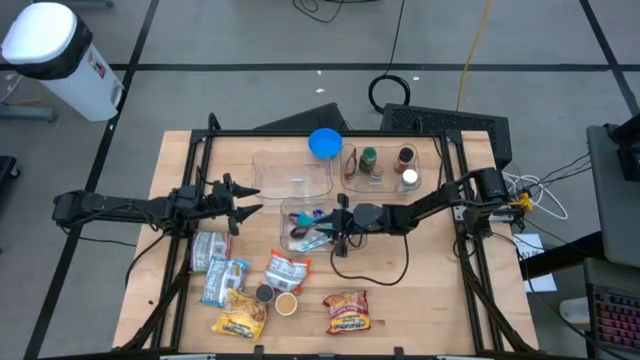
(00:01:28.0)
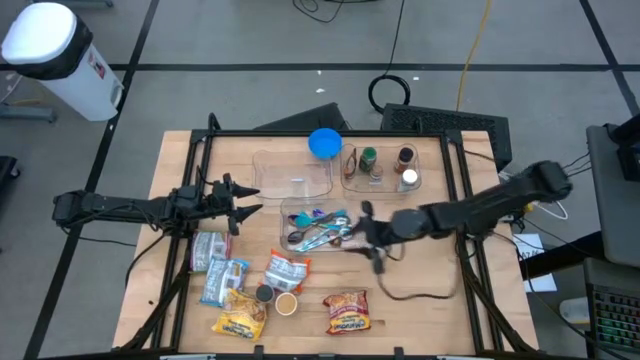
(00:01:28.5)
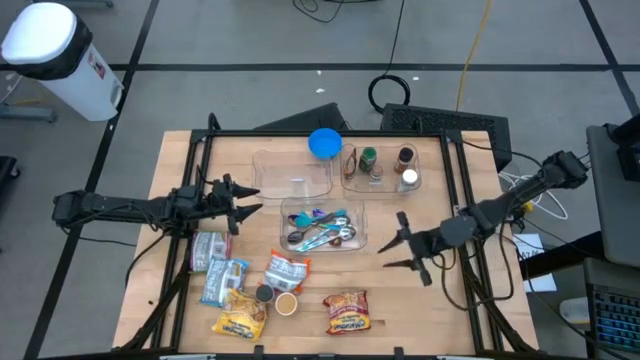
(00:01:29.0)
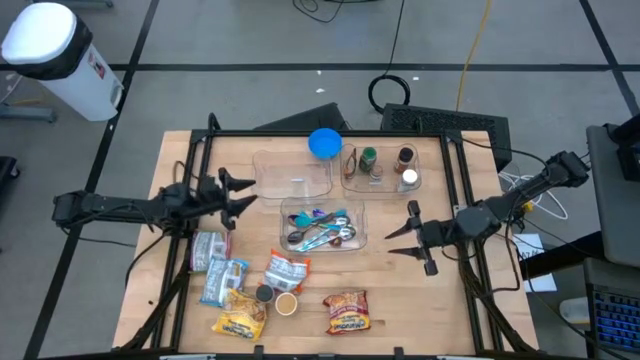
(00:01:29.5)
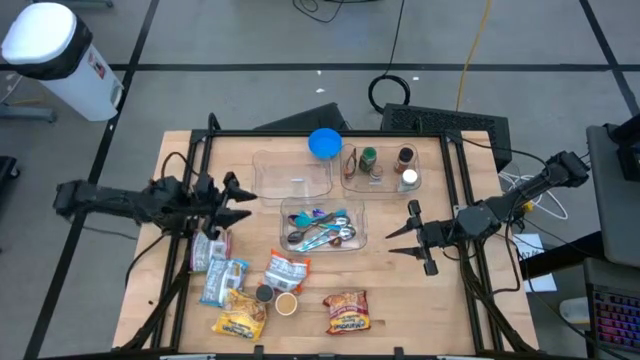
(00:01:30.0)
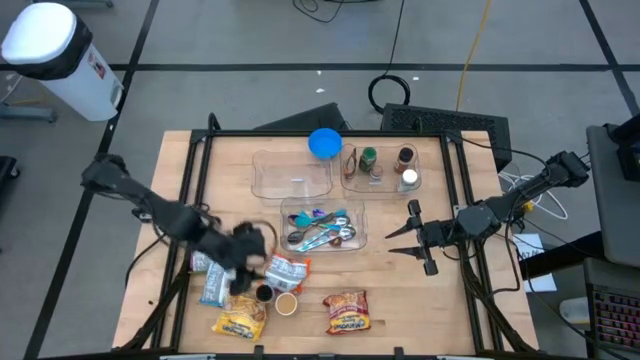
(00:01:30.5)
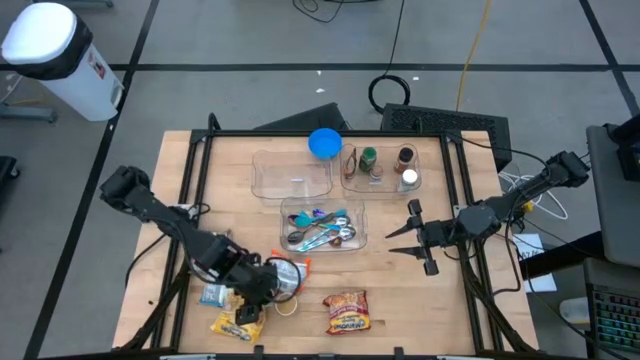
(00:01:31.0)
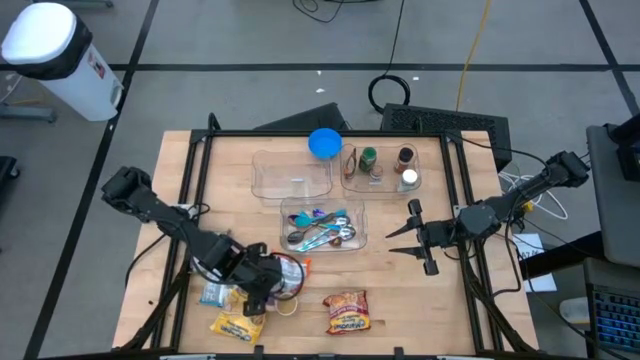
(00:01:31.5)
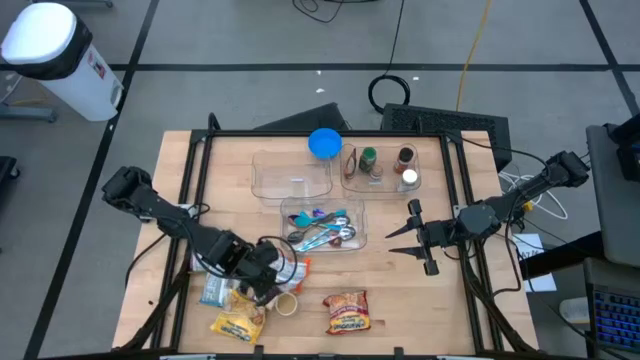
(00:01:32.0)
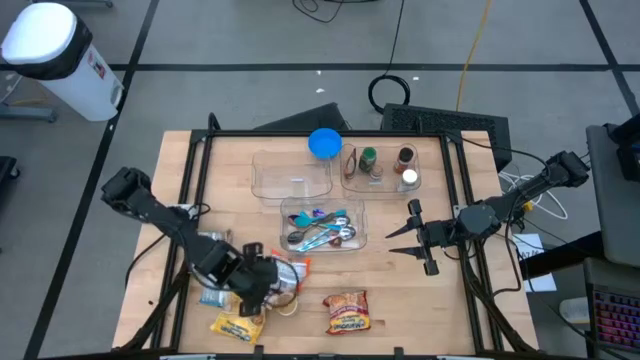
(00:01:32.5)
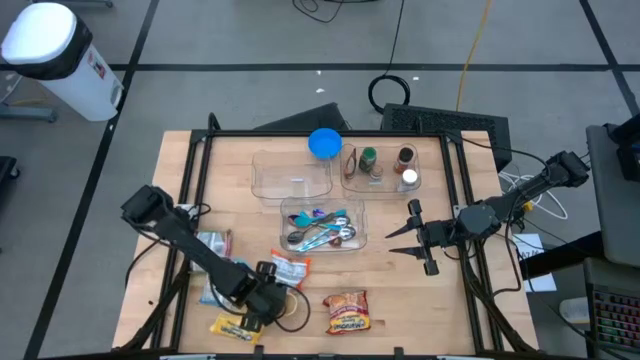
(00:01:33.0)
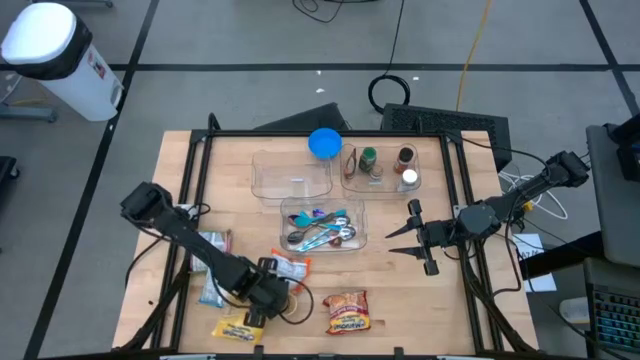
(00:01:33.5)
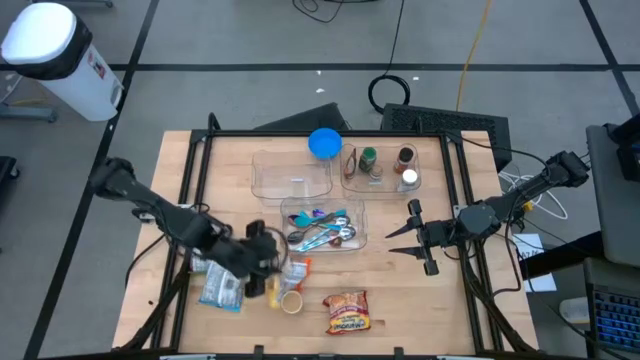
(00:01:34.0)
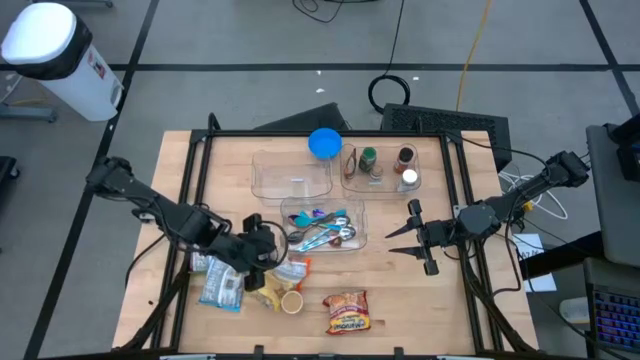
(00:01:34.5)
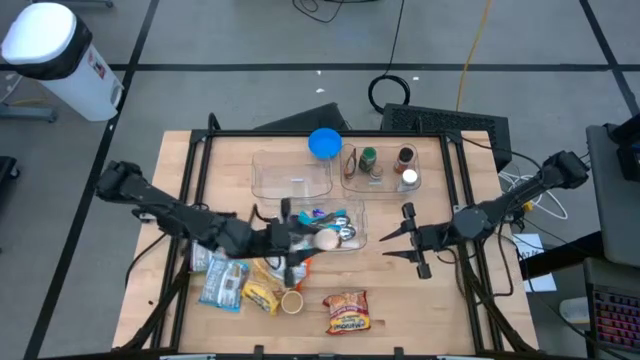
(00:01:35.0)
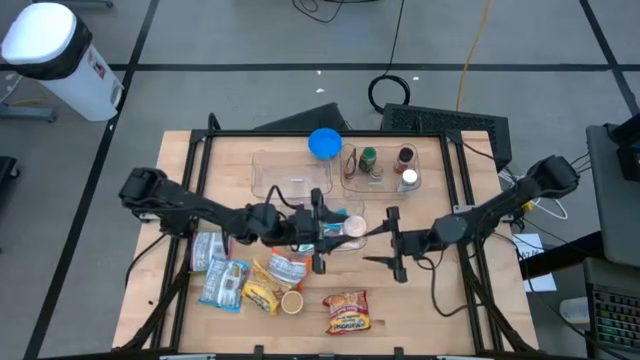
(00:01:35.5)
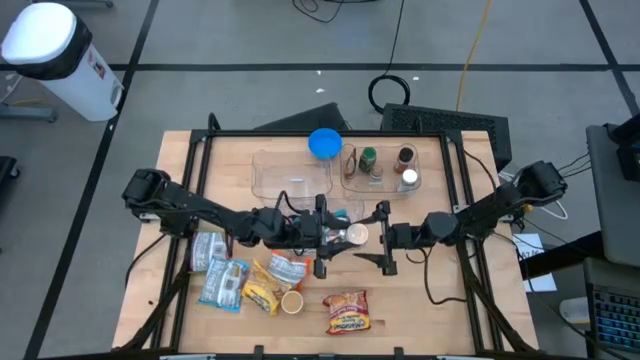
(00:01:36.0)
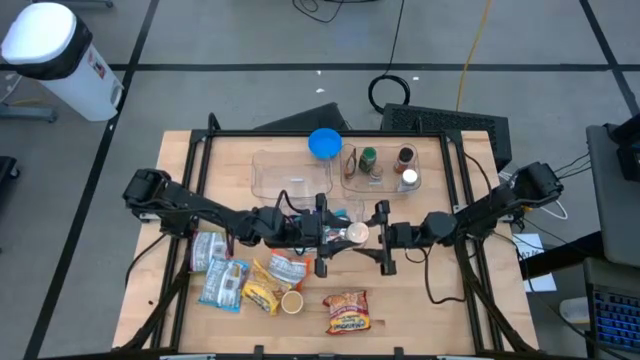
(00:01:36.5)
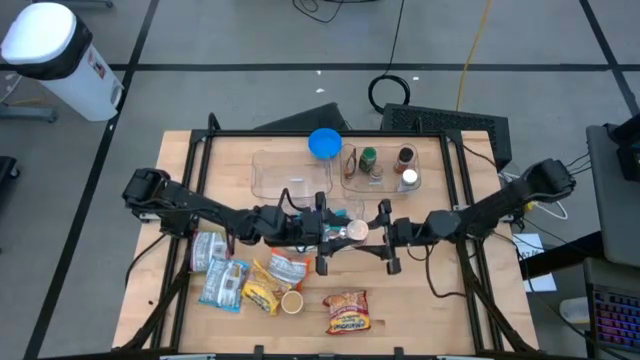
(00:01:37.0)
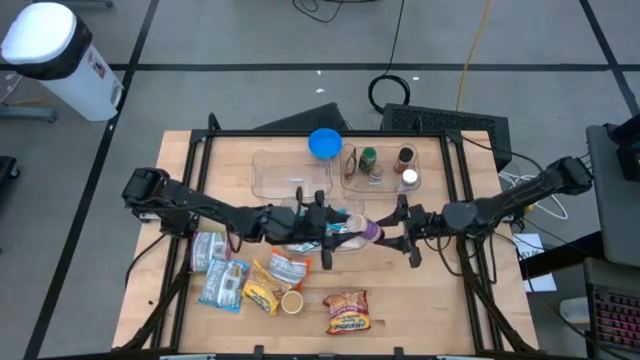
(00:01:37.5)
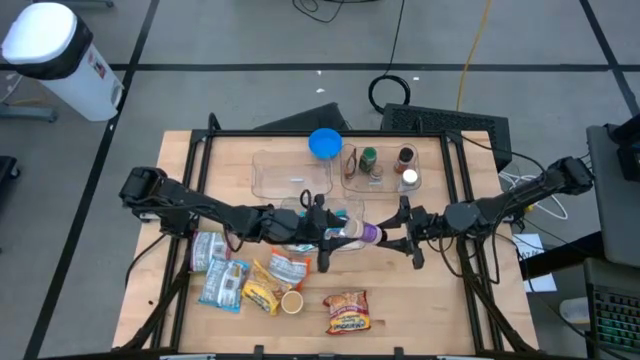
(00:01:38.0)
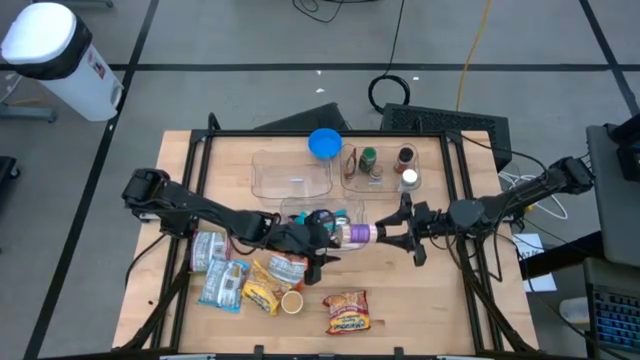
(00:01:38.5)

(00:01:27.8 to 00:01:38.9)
Task: Pick & Place Food Item
Put the violet seasoning bottle into the top right transparent bin

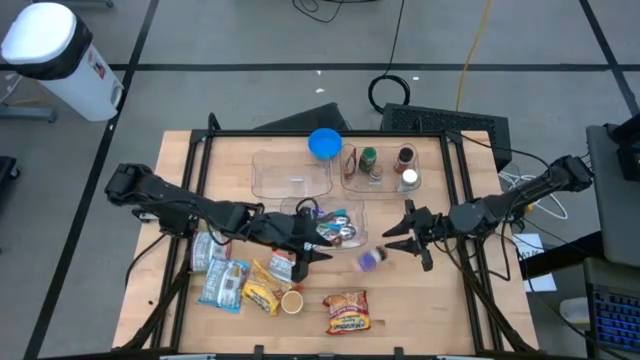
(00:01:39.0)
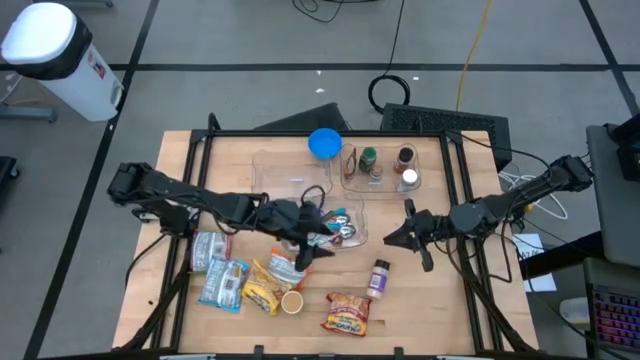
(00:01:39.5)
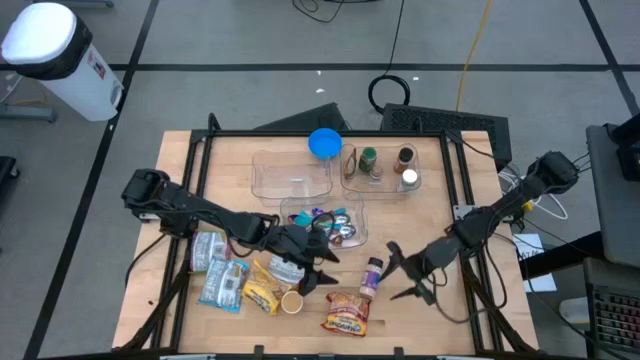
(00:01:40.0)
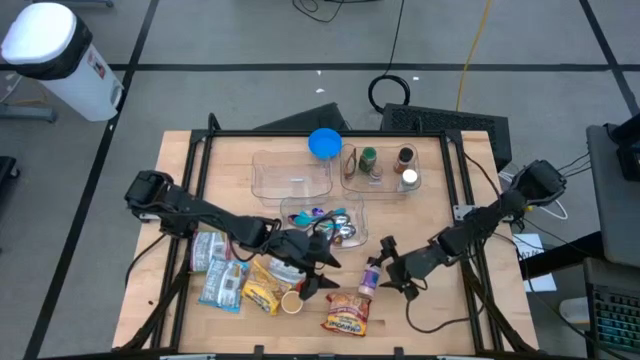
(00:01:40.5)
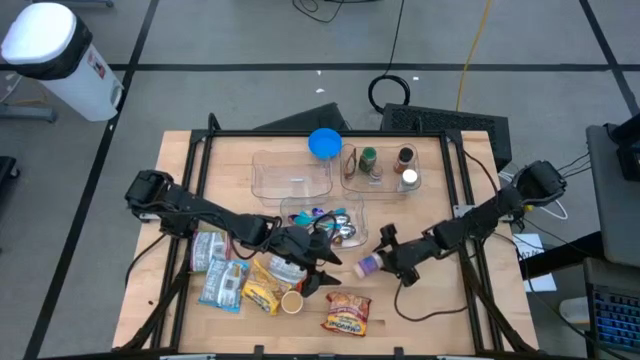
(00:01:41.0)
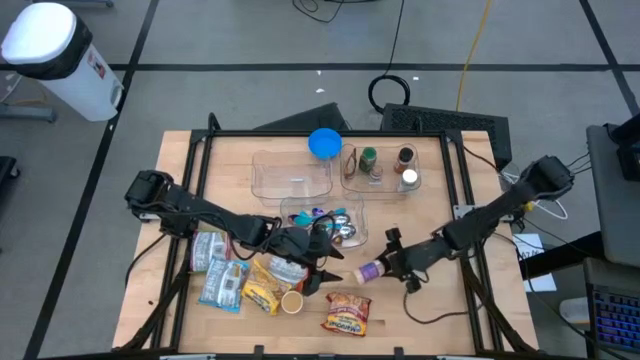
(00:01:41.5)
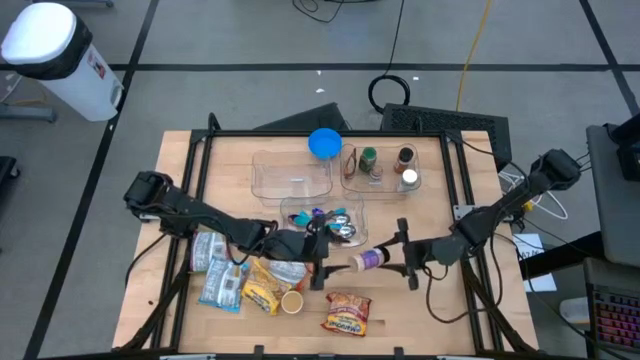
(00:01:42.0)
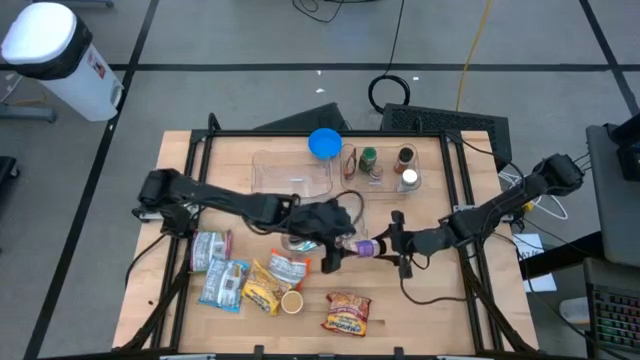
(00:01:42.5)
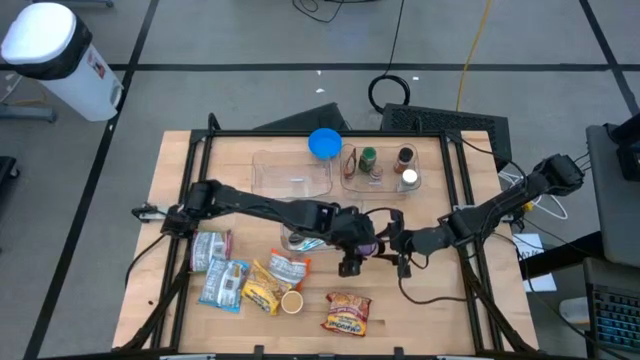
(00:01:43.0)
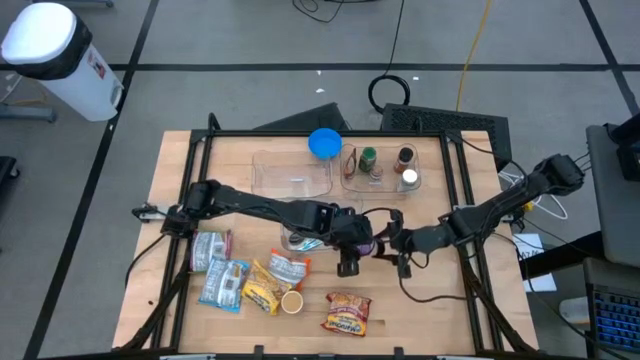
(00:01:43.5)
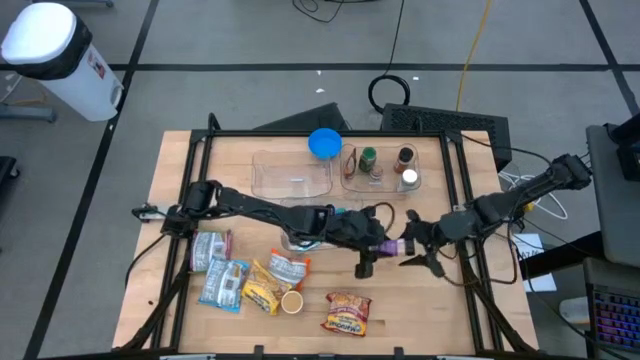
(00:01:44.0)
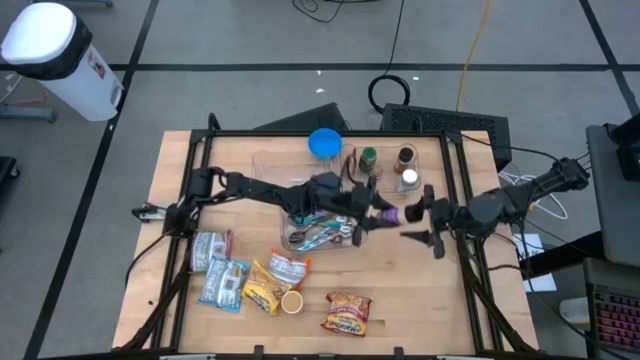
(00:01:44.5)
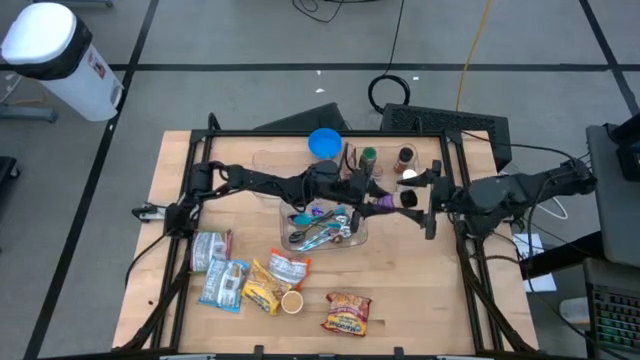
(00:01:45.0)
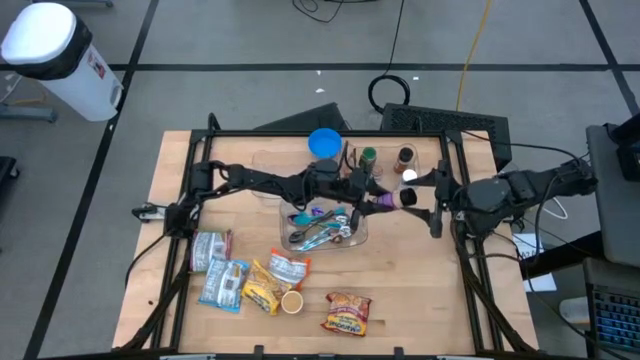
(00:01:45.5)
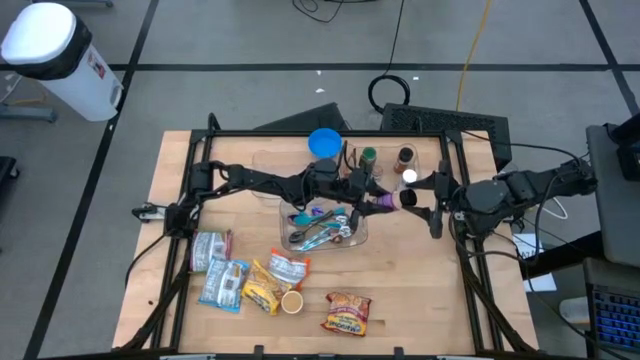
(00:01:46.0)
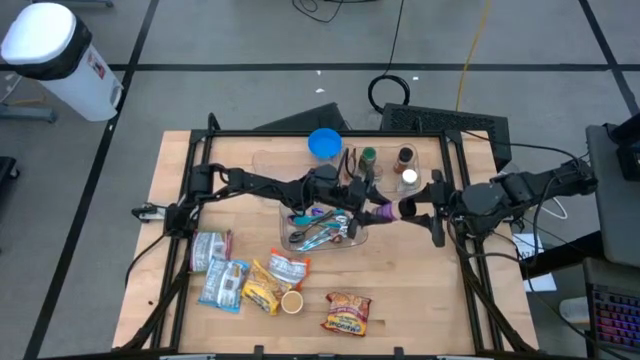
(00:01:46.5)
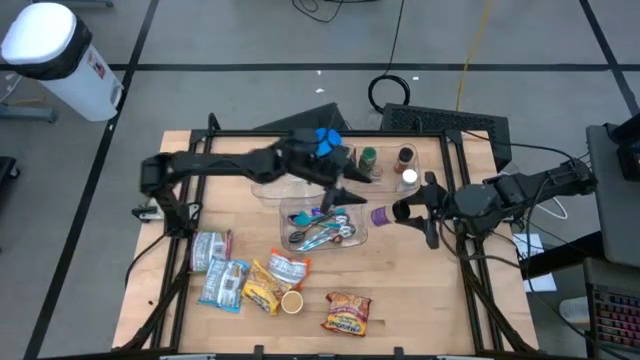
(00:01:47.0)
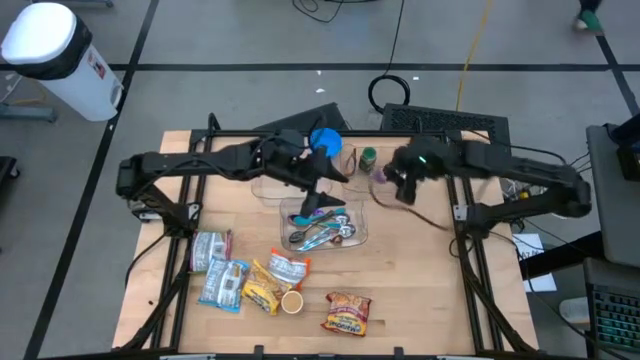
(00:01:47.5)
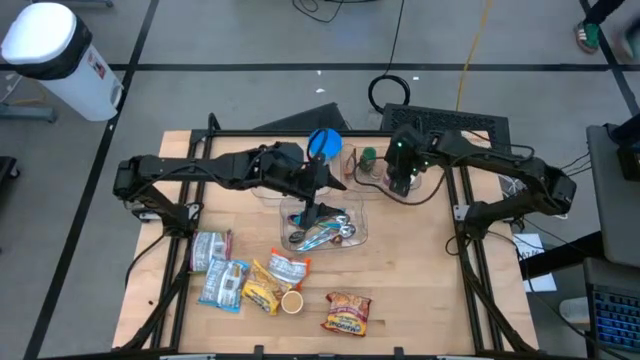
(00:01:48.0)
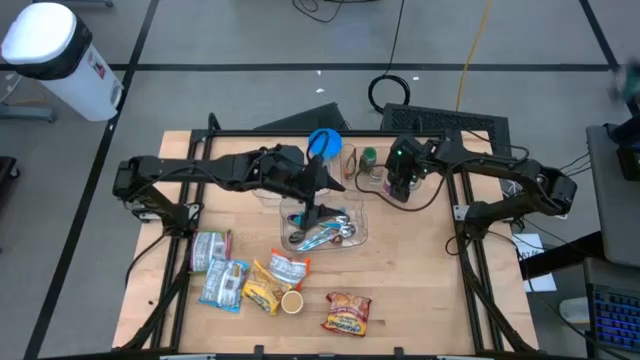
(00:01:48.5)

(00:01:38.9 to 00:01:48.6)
Put the violet seasoning bottle into the top right transparent bin
